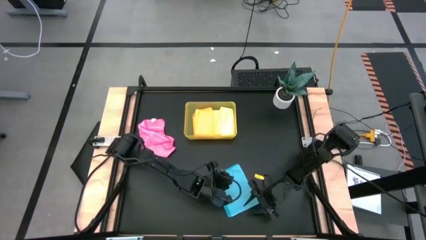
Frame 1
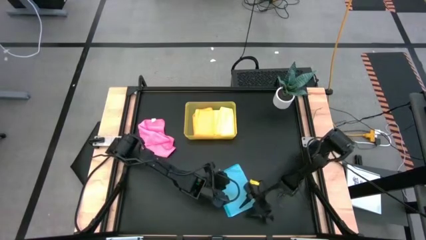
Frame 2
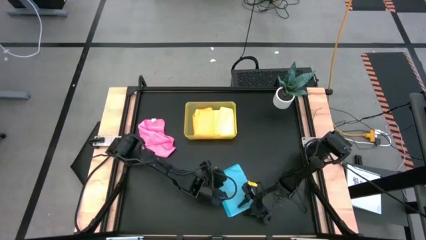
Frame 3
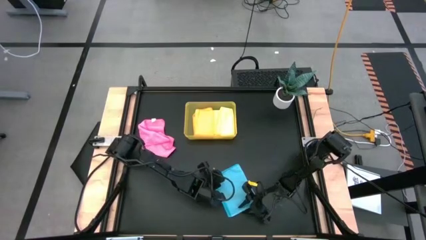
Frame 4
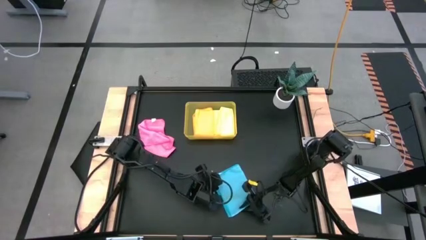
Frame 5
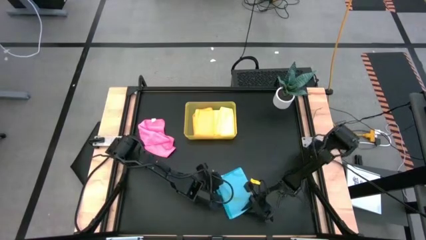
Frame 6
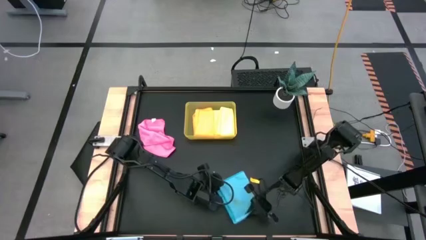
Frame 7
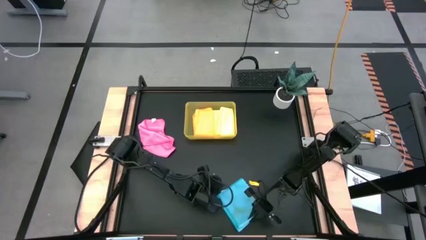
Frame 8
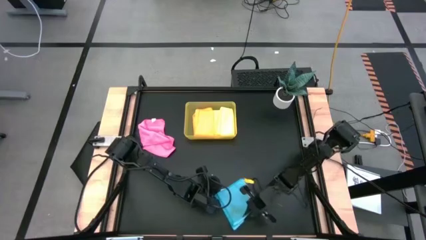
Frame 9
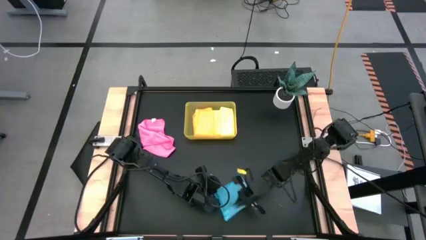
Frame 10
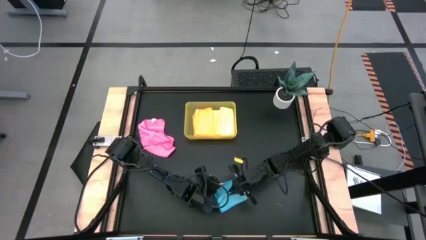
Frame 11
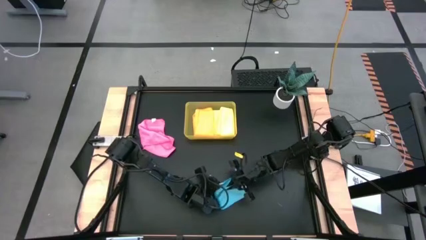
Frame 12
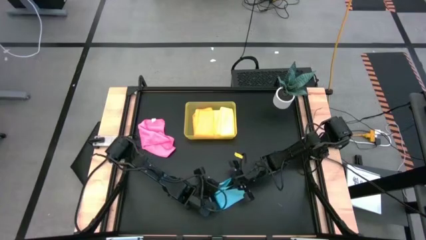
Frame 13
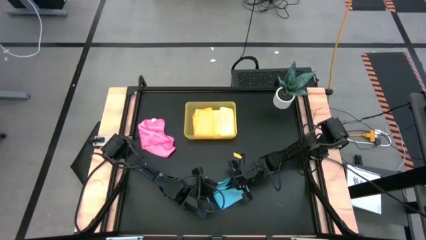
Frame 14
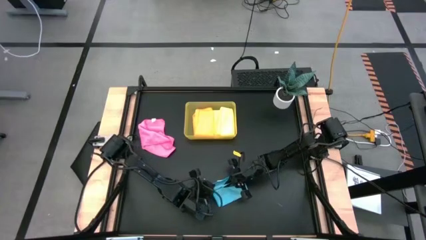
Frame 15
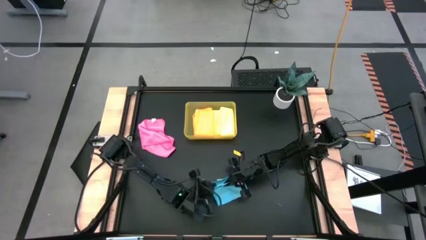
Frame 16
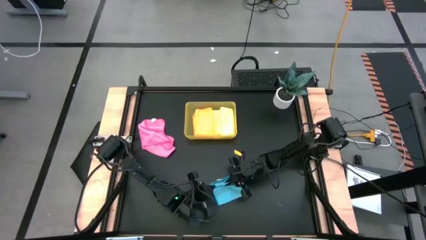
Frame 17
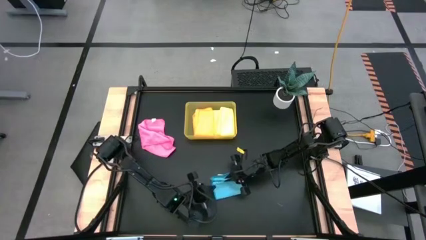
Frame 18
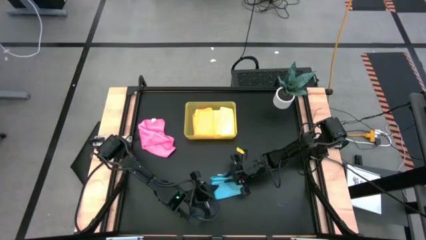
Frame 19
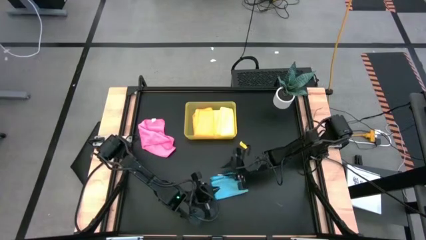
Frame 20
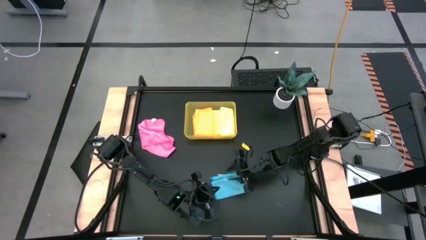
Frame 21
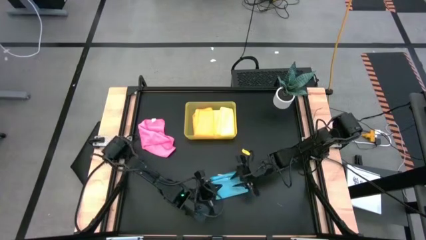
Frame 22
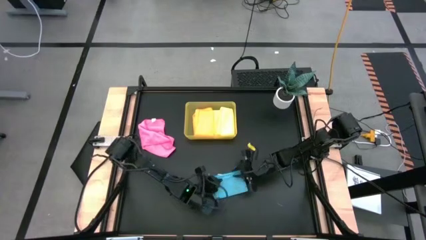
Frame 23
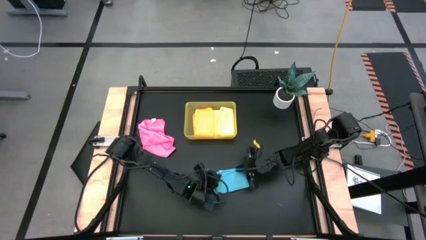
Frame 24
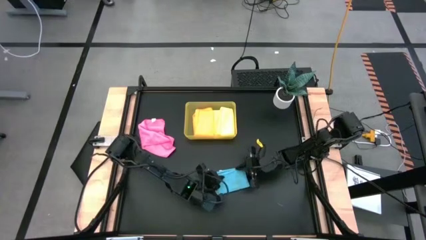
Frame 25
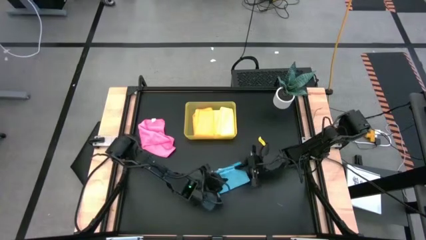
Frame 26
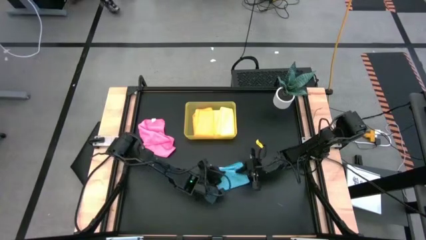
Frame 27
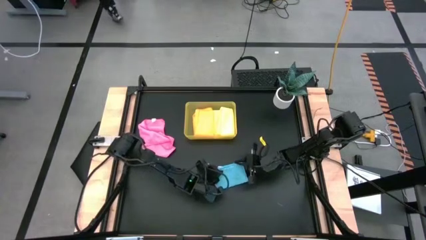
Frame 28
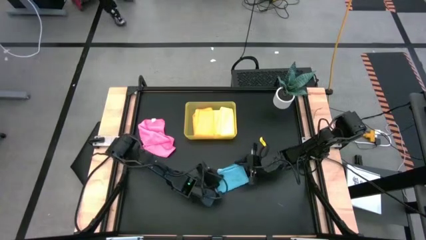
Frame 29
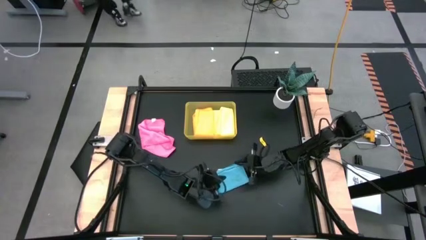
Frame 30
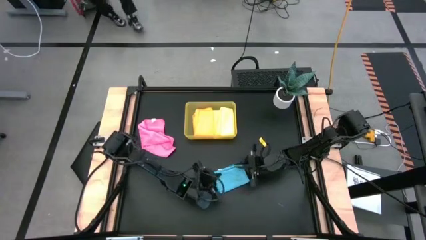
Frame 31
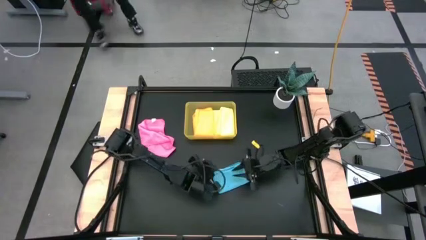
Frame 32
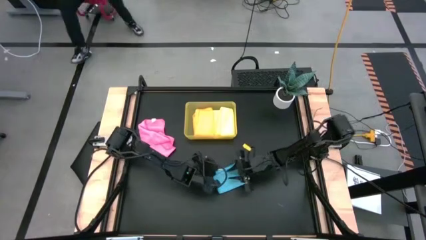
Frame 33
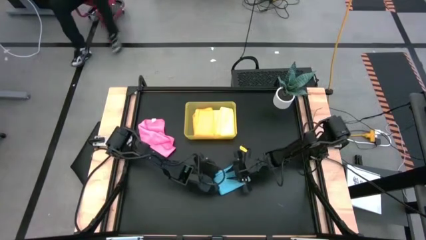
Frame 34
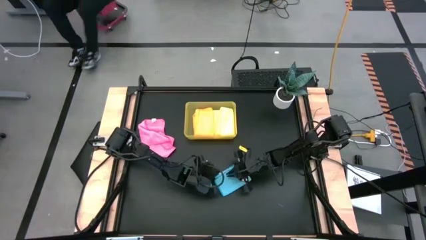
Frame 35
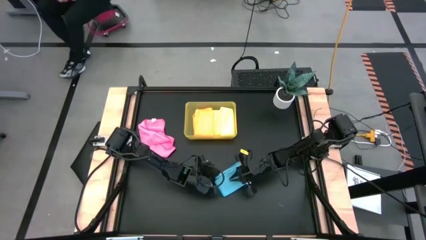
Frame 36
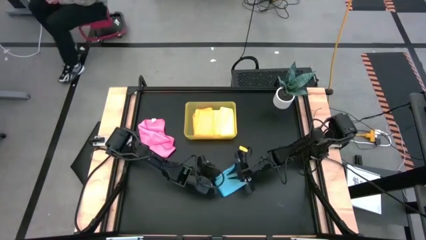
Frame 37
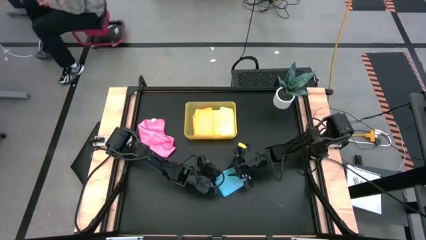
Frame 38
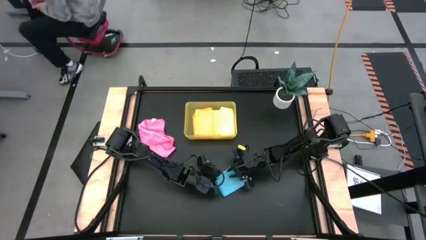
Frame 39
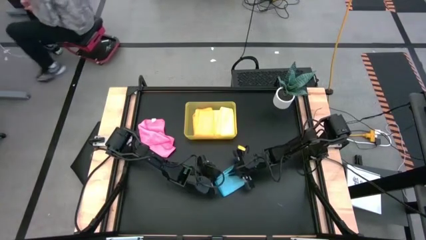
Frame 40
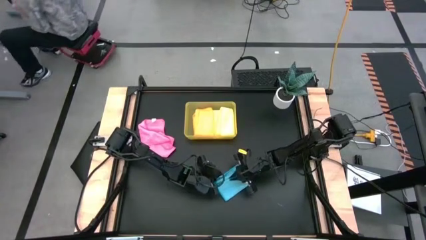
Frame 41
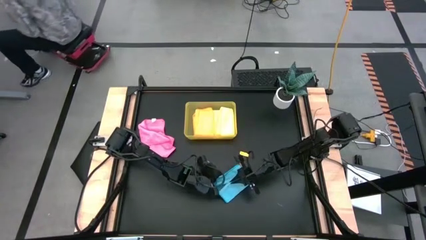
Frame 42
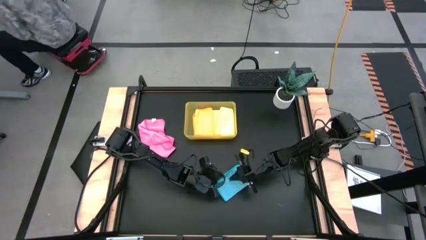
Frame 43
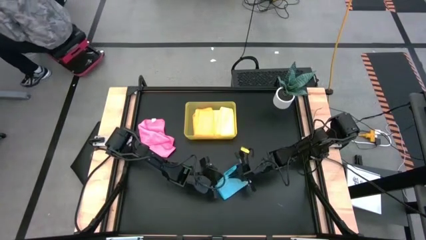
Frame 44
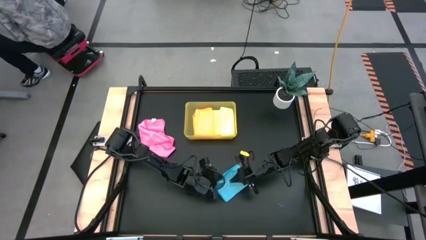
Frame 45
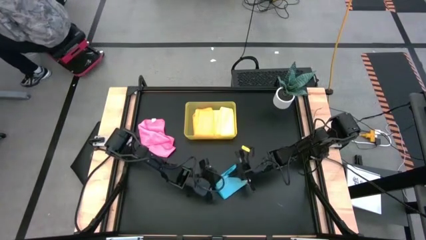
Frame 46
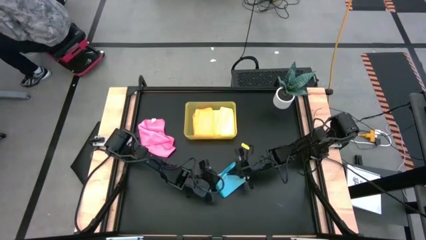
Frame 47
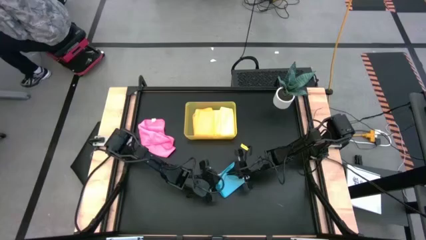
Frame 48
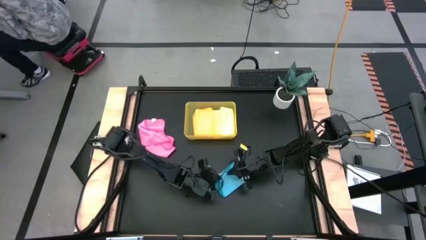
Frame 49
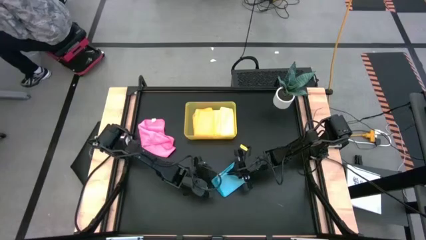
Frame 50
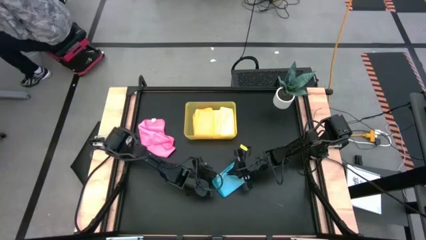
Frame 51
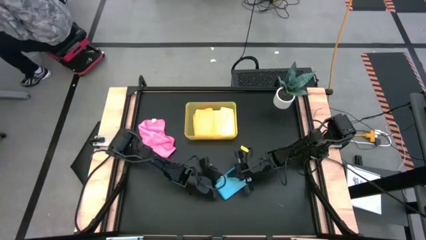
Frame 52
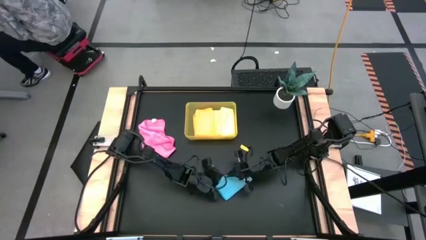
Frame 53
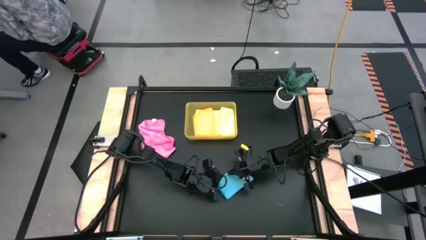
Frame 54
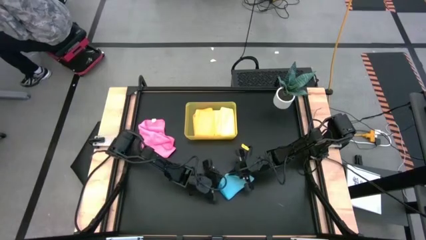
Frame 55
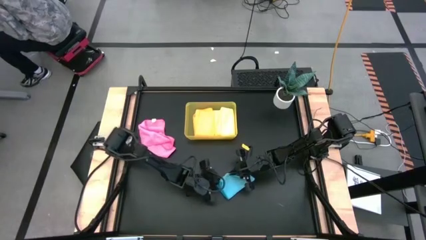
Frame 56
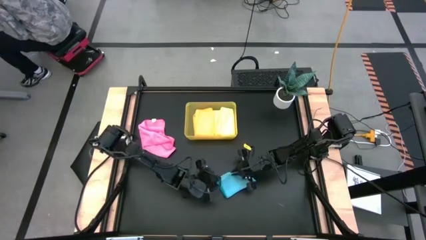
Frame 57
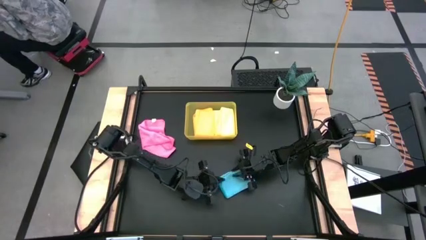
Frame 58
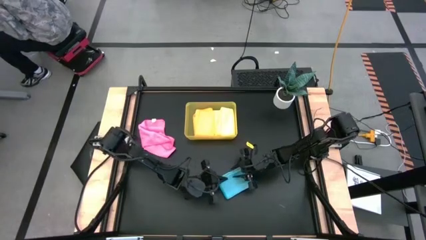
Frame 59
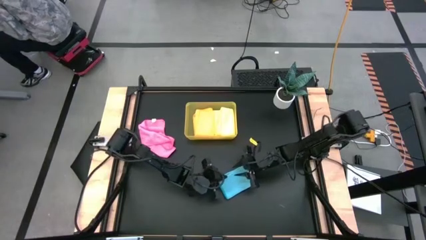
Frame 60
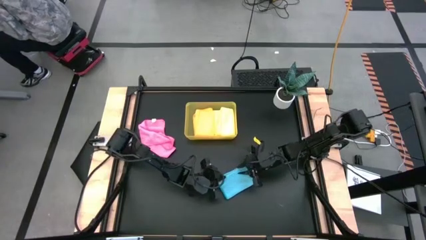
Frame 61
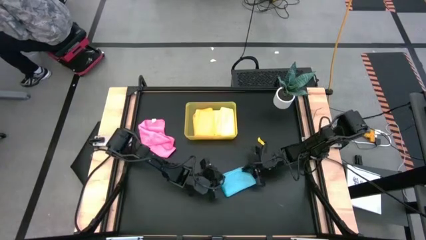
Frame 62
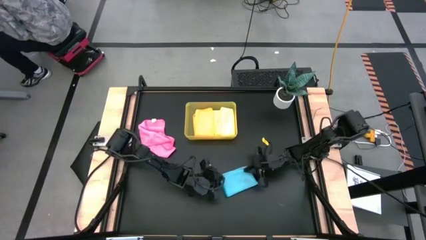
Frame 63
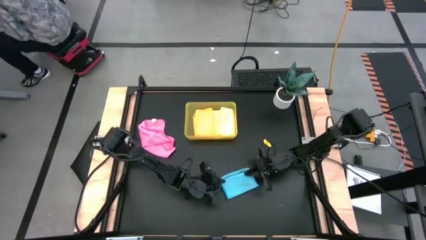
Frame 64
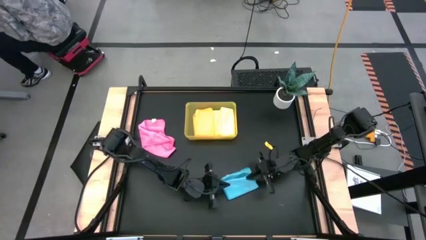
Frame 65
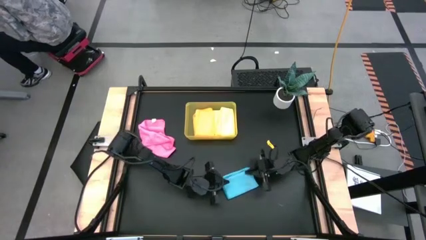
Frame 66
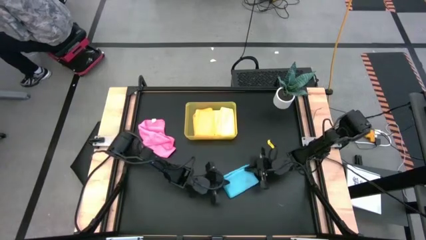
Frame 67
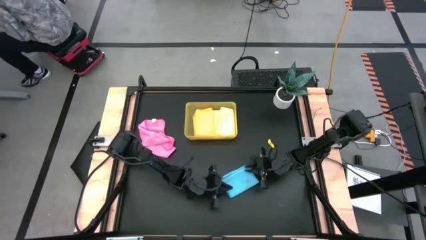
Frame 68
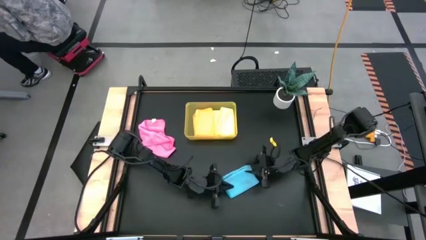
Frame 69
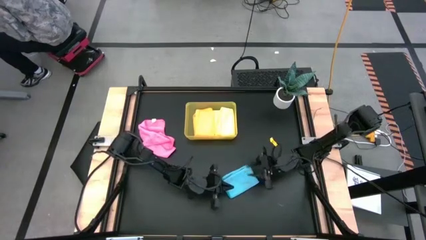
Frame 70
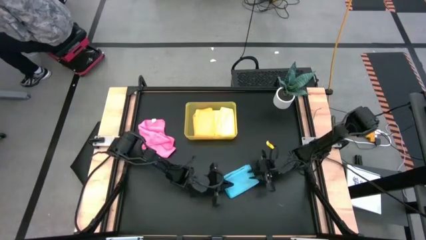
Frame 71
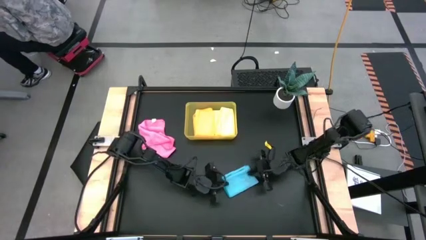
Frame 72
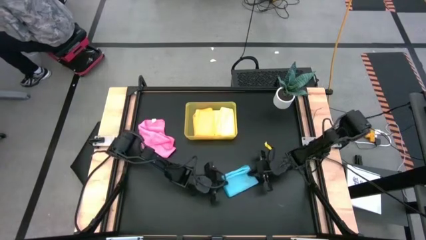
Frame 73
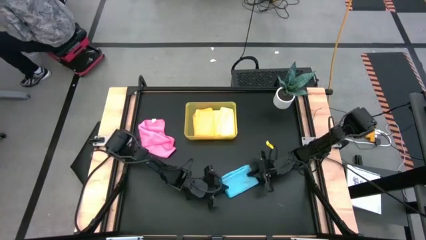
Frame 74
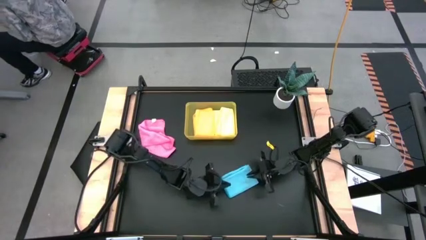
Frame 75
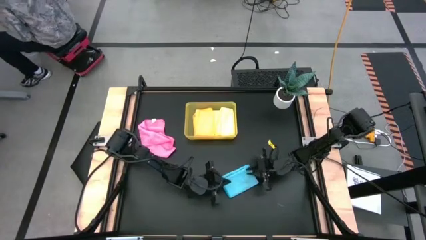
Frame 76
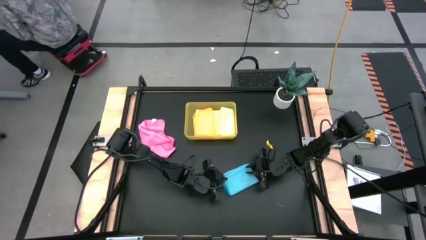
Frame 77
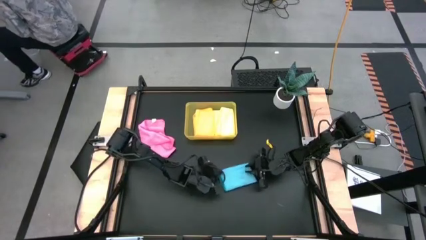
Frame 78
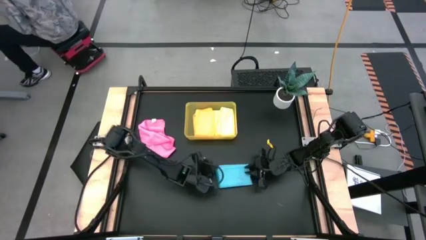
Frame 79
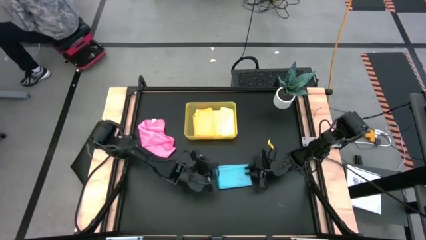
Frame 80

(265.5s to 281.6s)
Task: Fold microfiber towels
Fold the blue microfiber cloth
